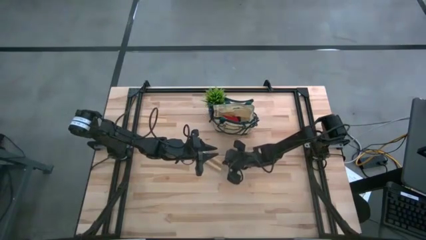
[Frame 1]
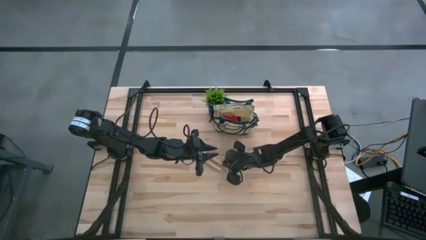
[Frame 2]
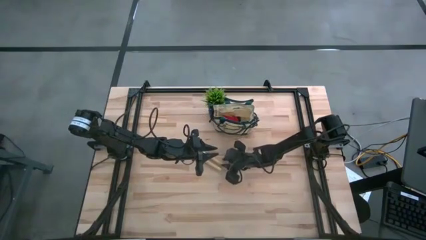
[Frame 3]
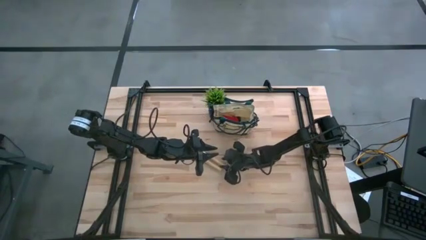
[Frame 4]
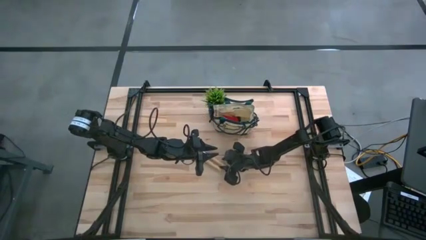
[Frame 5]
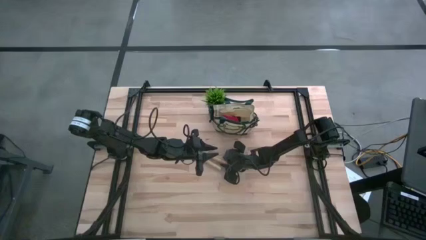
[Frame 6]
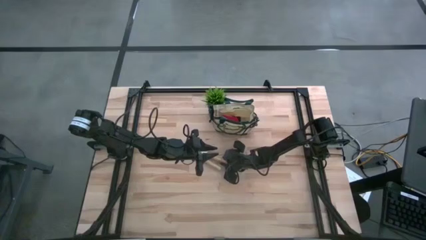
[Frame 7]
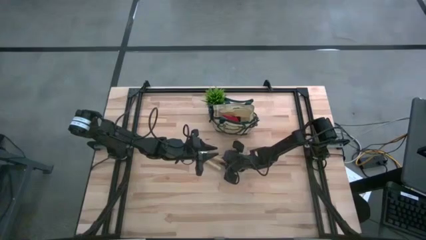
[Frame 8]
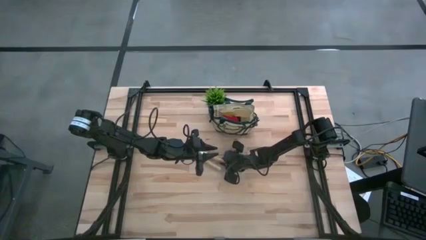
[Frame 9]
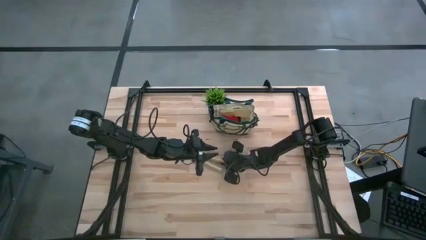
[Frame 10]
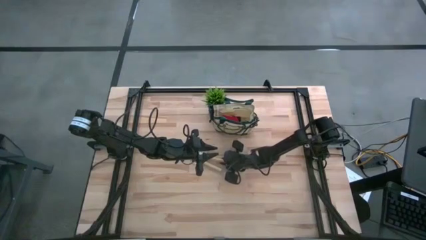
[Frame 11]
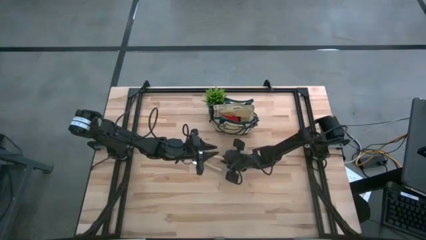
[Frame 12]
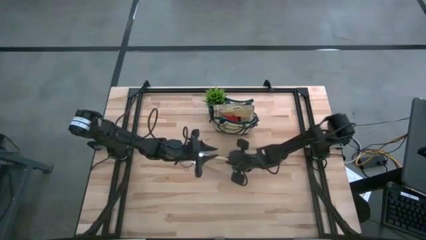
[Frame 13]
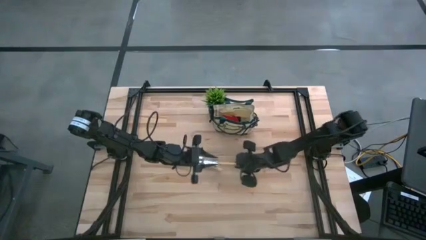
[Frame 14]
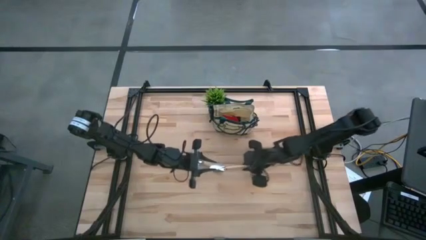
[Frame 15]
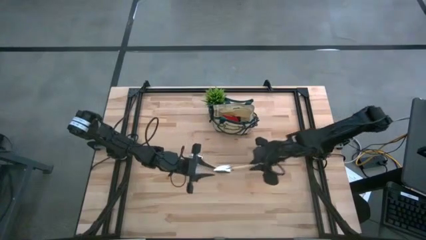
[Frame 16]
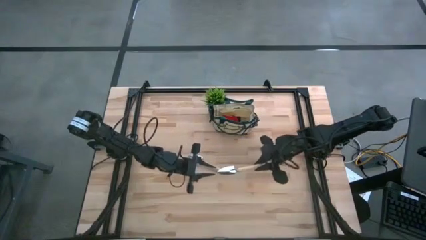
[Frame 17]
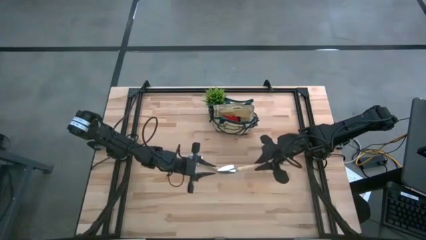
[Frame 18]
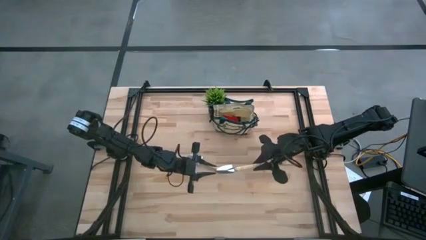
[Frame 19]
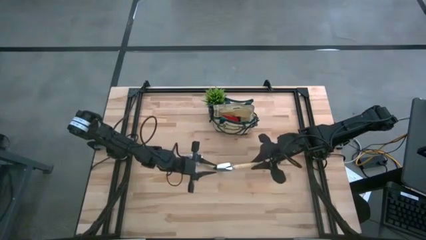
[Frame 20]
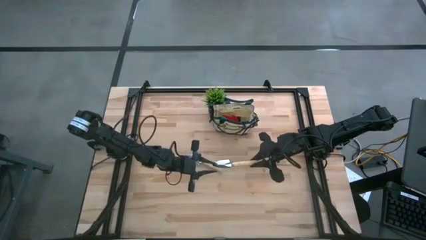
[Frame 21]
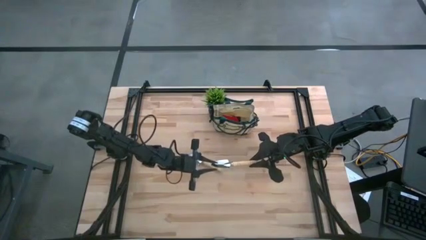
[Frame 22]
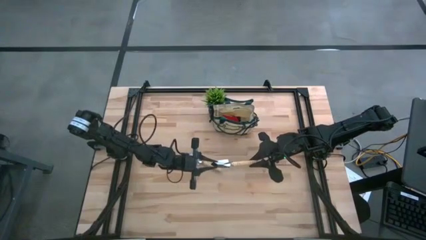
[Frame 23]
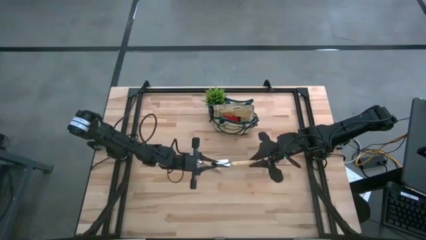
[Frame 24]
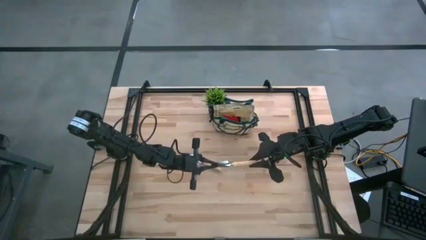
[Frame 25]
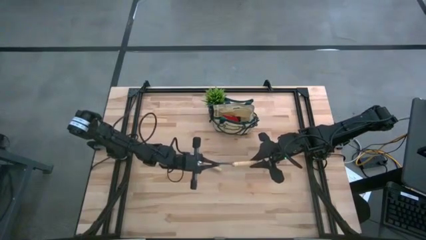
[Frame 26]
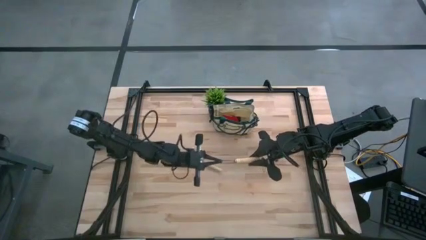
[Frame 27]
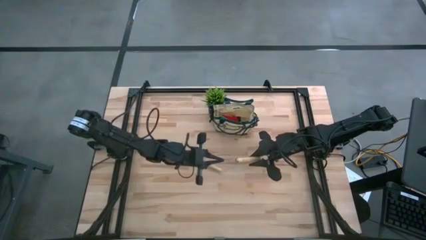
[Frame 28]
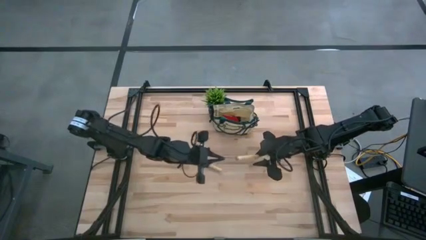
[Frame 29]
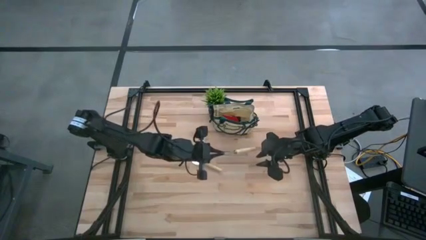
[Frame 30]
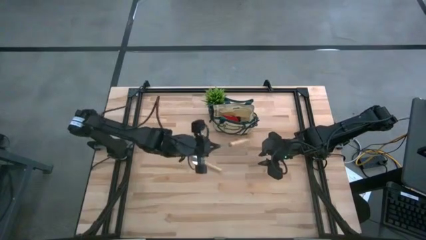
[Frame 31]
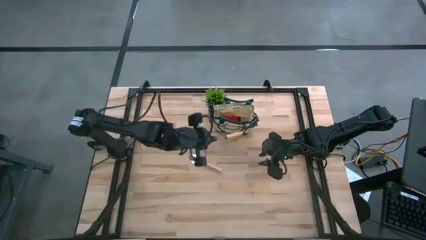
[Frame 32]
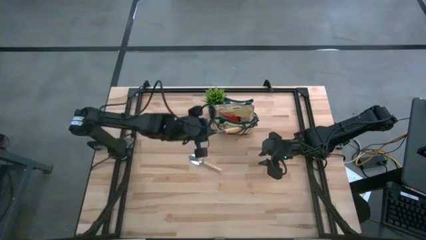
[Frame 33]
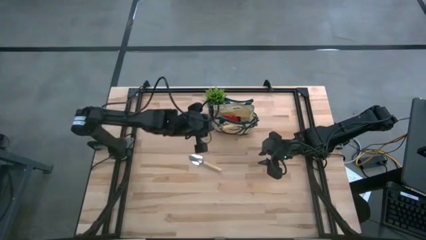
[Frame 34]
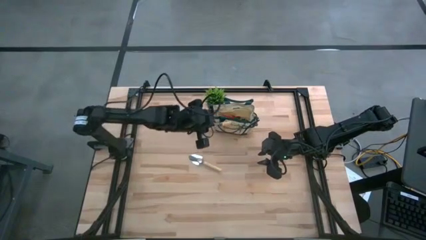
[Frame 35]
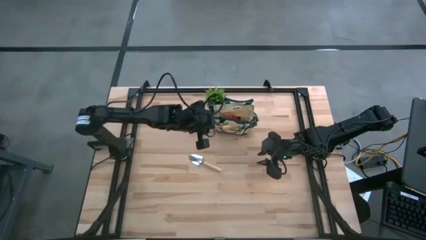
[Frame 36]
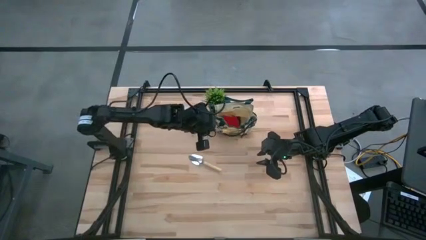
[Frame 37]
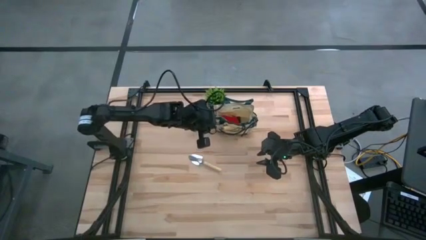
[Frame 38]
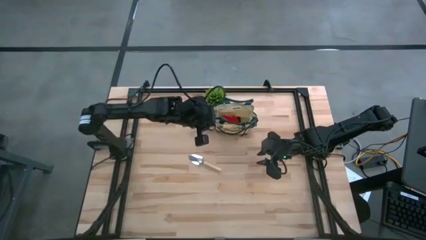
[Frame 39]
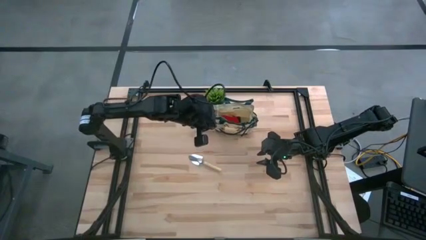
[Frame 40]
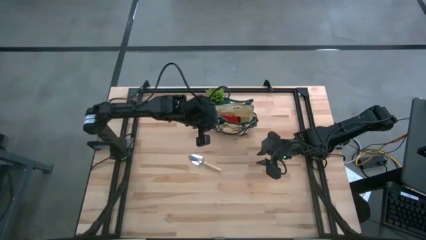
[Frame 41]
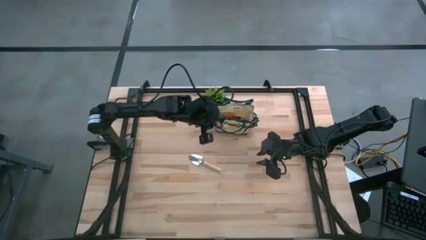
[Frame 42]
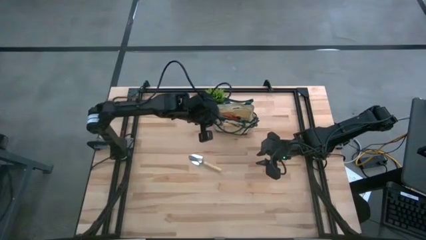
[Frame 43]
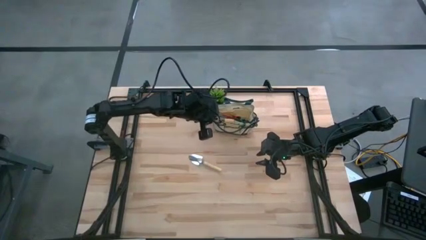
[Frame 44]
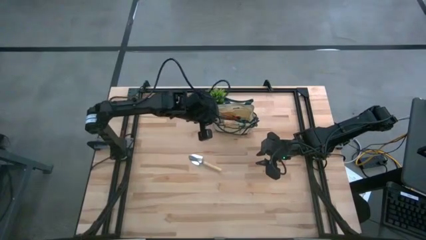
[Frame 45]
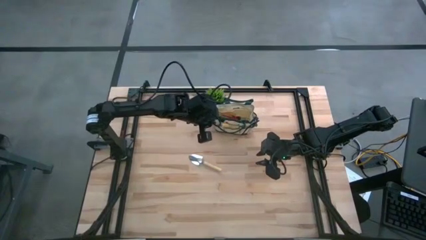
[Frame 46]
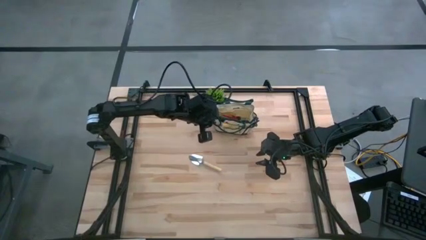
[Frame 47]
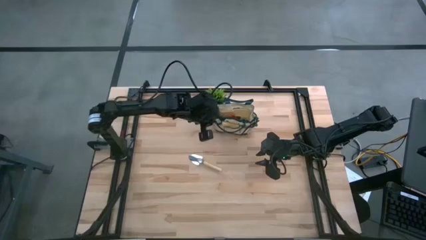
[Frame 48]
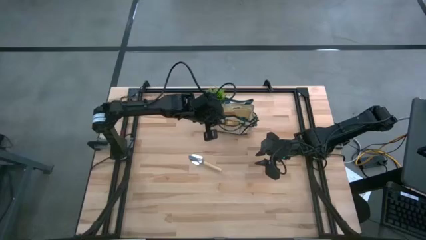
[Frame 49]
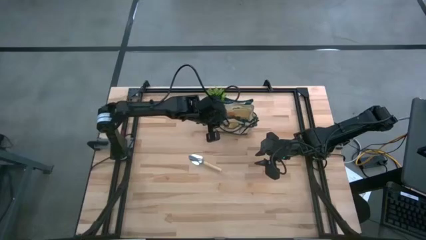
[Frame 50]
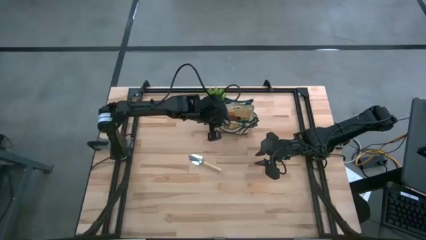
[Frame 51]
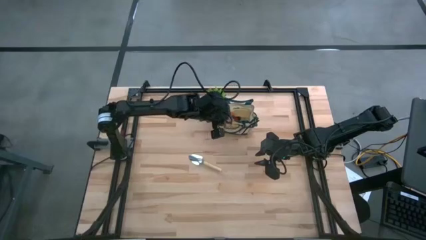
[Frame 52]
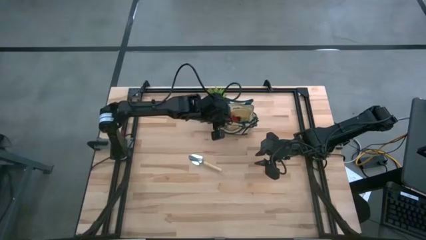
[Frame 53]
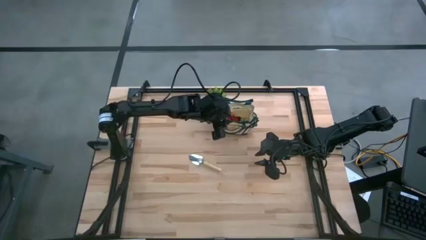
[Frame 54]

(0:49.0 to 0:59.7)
Task: Pick & Place Garden tools in Gardening bag
Put the right brown trowel into the gardening bag
